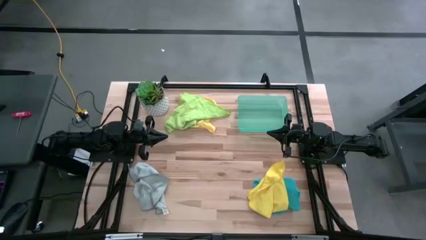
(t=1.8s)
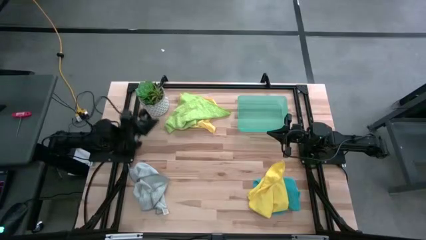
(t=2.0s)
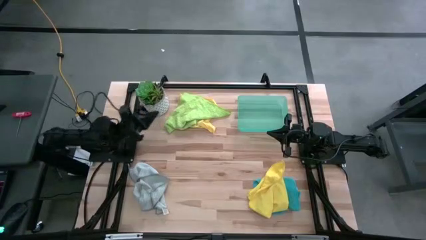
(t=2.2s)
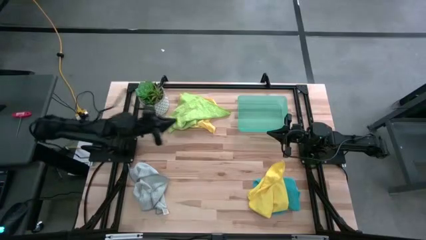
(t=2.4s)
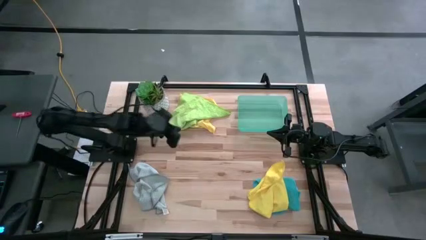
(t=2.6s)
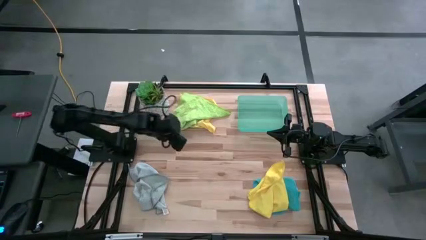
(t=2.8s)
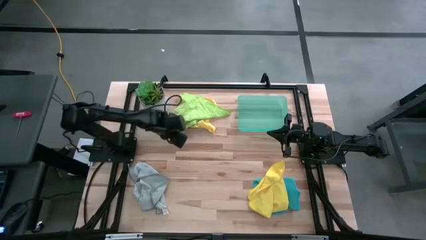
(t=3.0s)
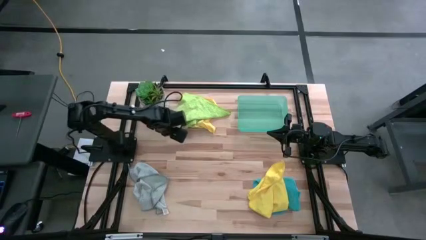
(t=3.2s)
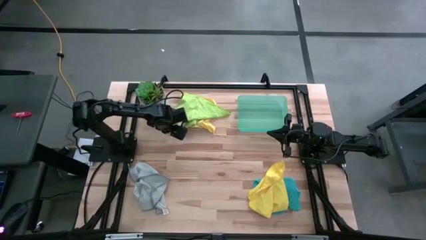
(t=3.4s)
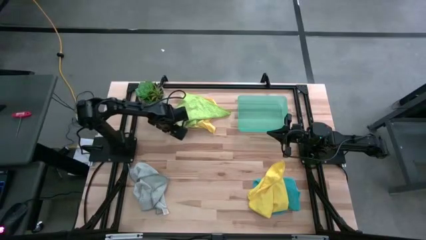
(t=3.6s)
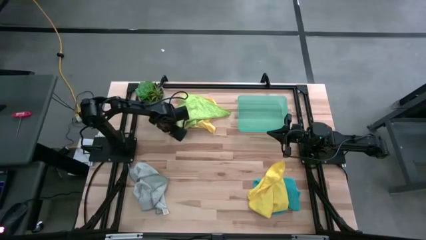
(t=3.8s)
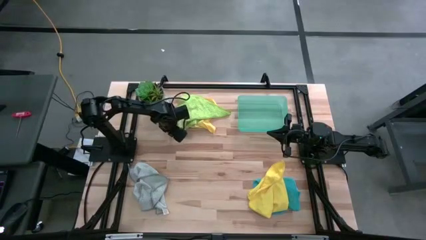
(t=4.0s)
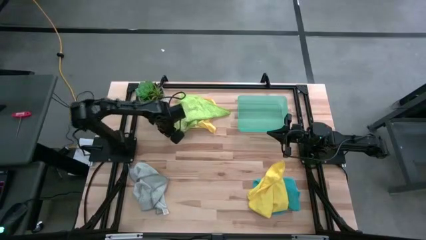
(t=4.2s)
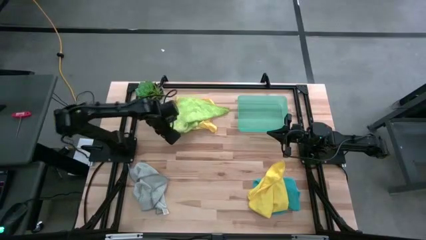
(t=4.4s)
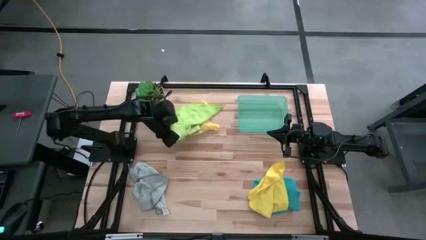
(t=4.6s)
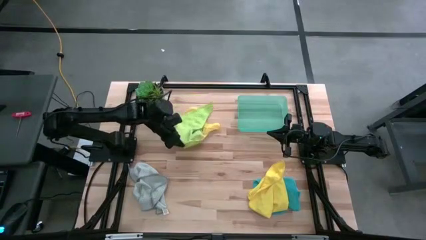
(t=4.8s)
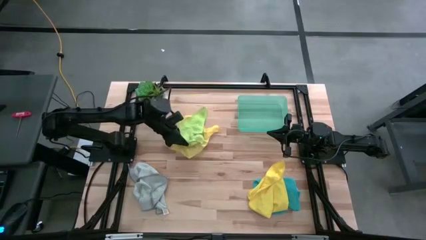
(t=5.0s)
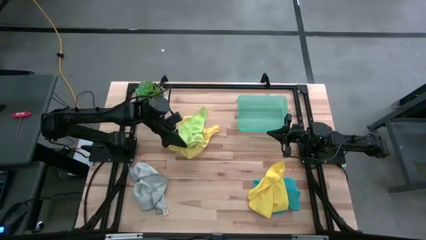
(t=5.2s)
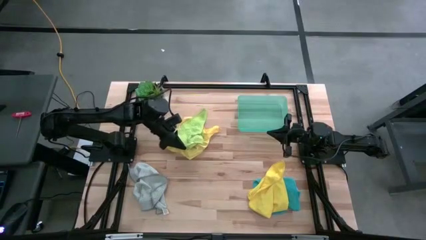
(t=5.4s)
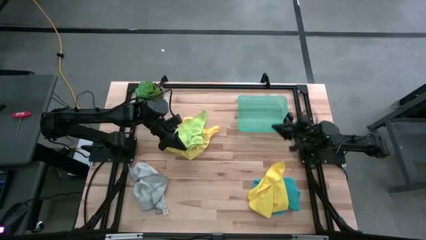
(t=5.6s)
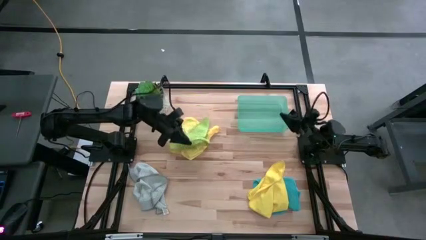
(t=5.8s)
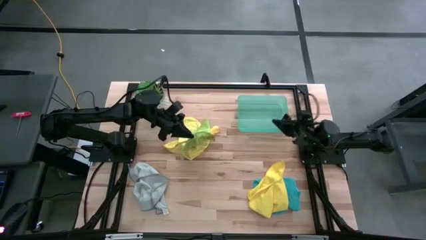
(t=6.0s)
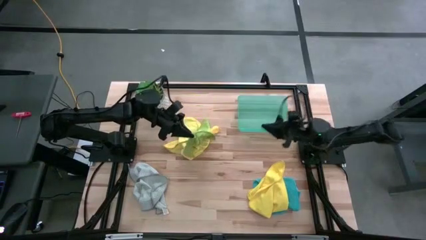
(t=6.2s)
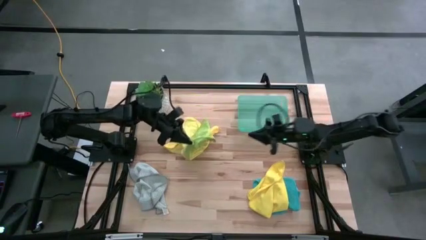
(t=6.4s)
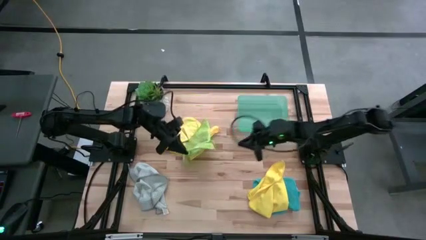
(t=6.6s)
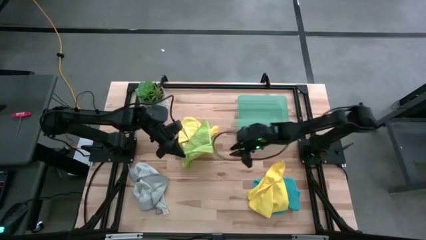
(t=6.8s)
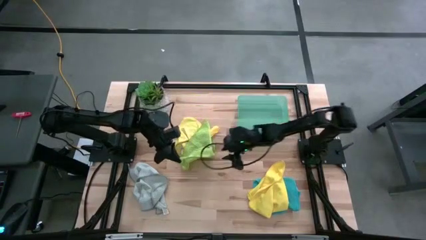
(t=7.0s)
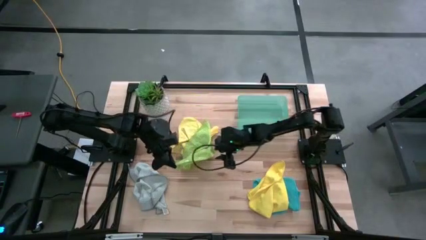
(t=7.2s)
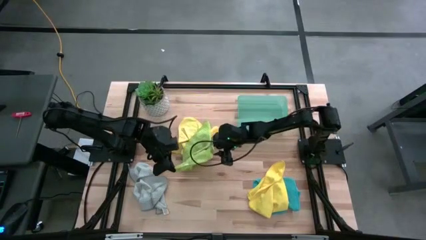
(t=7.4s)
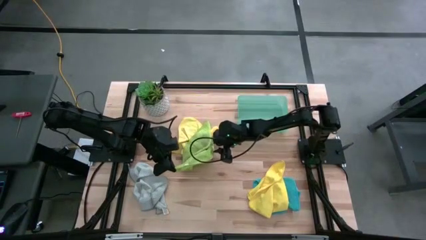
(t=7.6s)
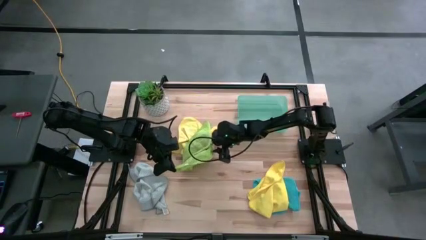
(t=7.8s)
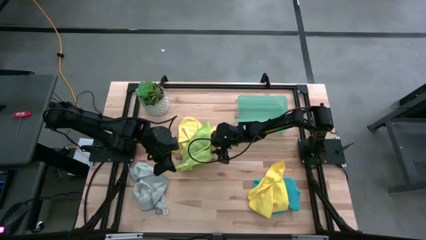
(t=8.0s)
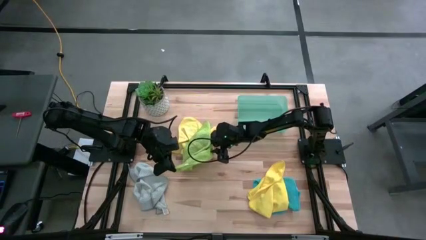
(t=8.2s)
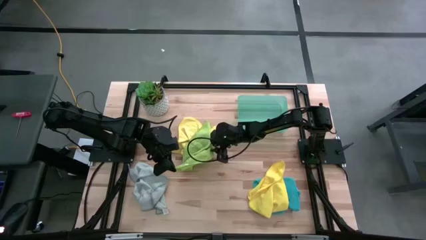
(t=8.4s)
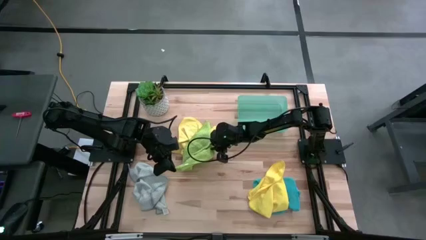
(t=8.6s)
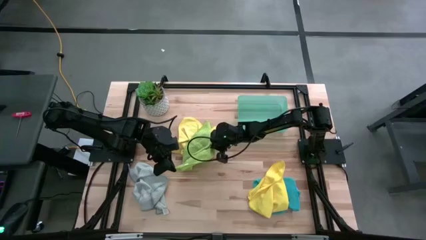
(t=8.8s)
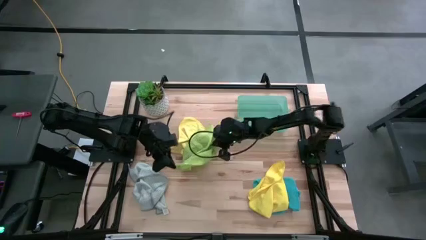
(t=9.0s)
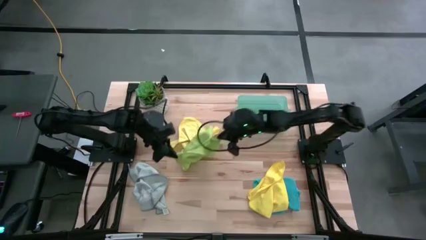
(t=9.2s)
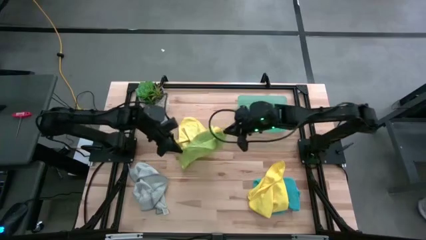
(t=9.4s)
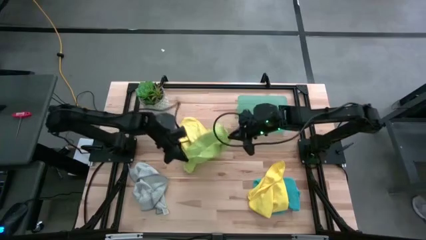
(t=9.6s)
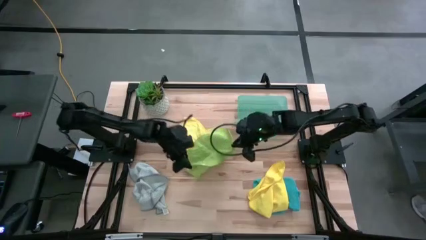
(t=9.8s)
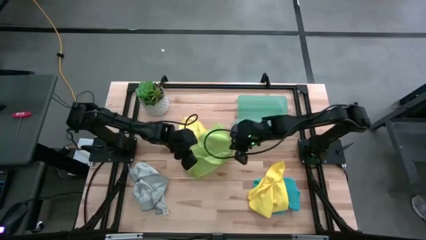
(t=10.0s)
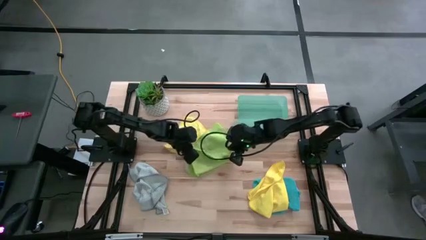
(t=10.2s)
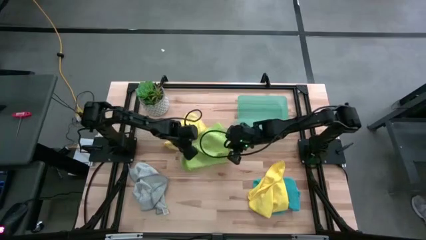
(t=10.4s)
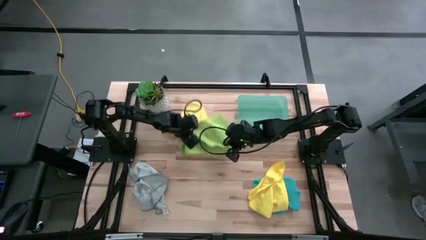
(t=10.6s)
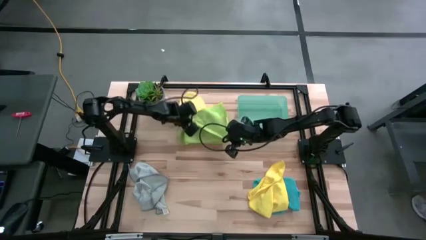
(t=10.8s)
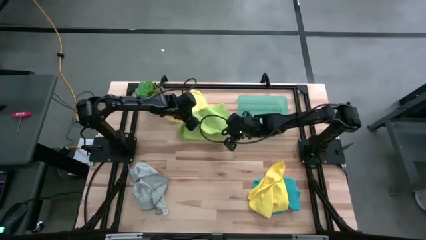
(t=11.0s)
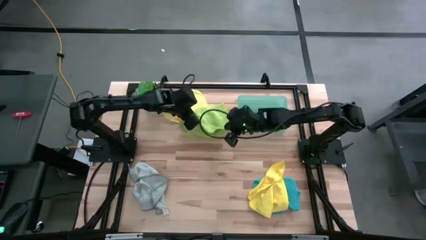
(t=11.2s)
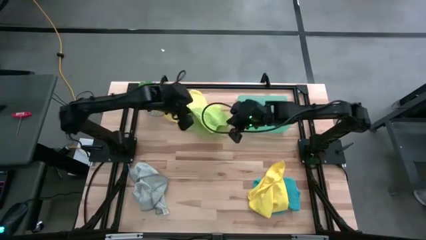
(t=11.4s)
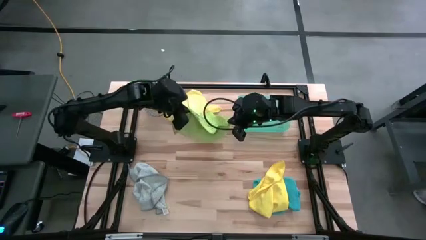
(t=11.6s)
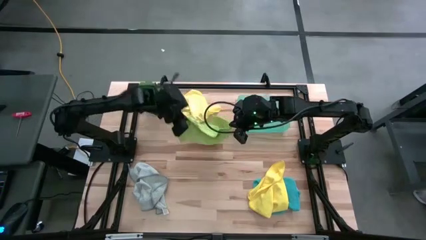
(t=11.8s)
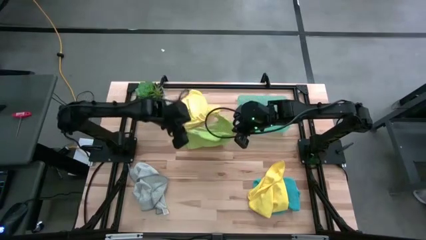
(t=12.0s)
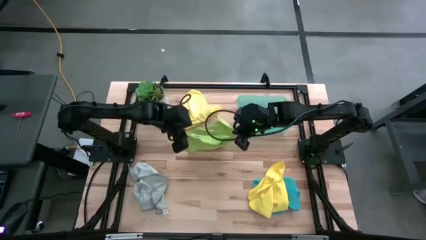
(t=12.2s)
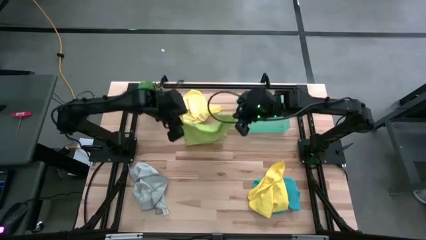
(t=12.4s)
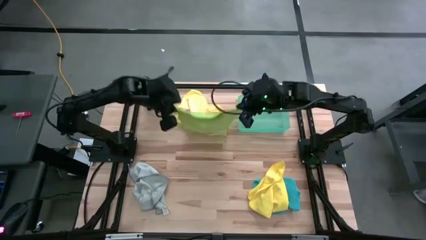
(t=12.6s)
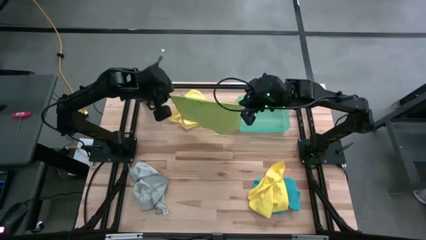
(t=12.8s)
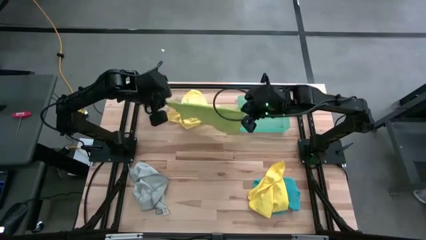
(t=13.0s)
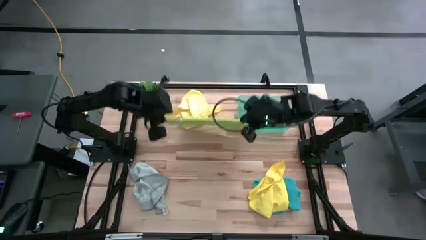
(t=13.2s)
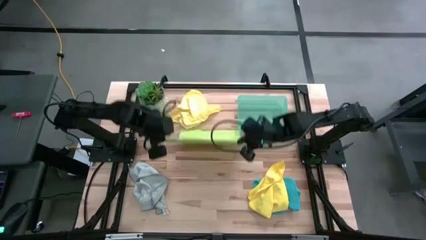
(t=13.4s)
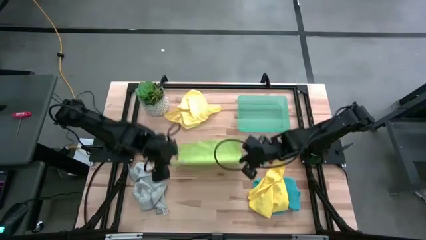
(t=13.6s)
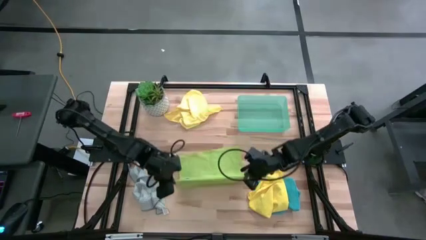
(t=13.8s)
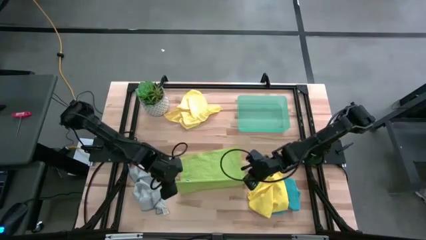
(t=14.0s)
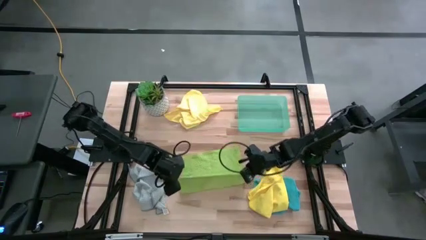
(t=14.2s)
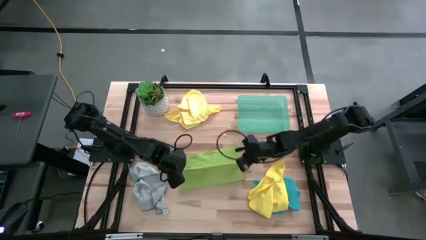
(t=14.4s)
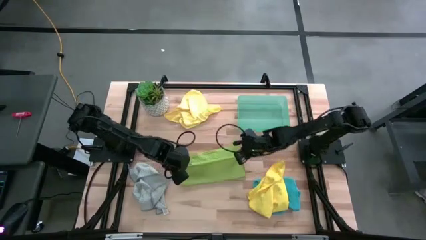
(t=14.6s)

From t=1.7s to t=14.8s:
Task: Fold microfiber towels
Fold the light green towel
